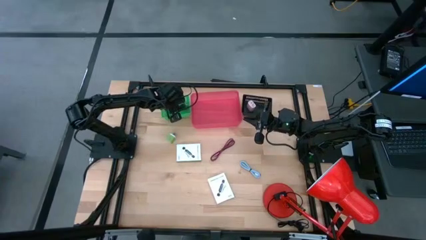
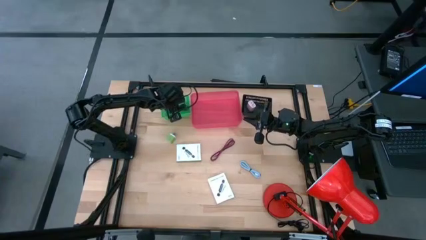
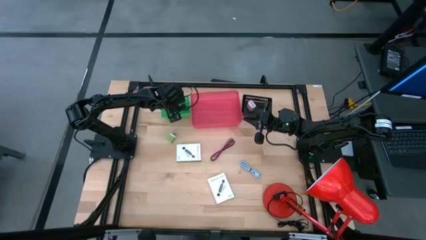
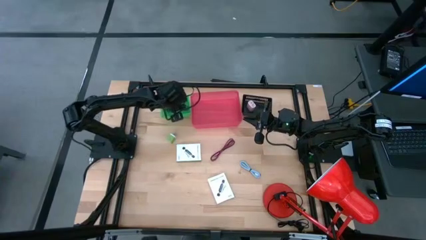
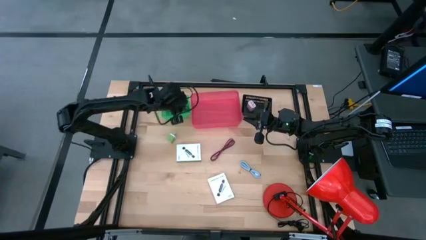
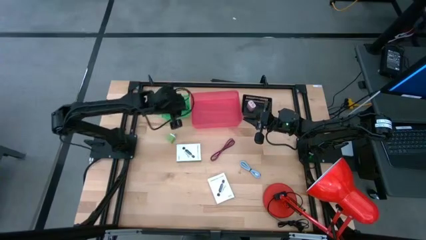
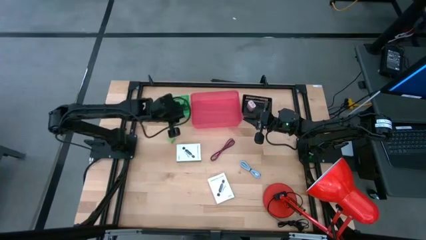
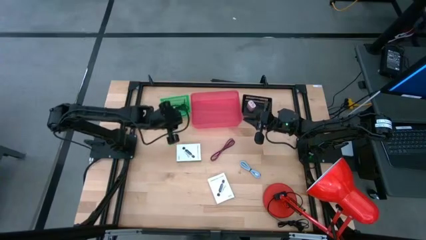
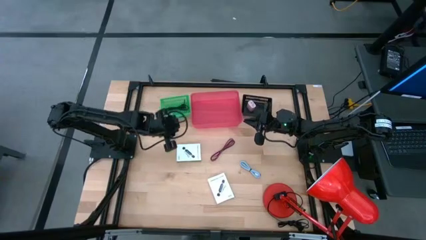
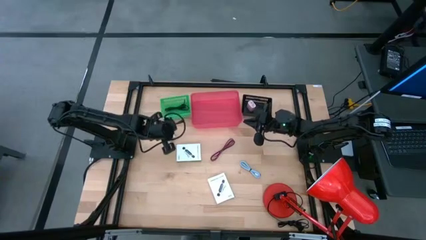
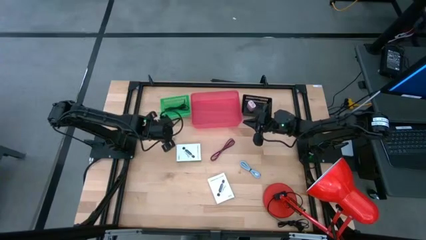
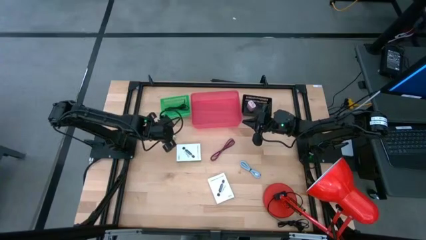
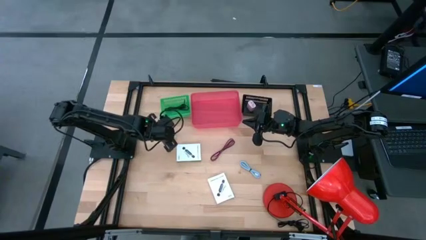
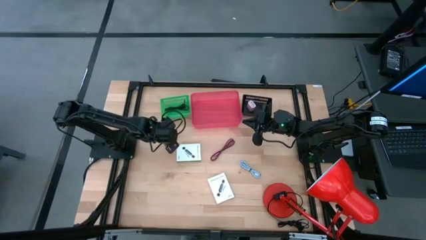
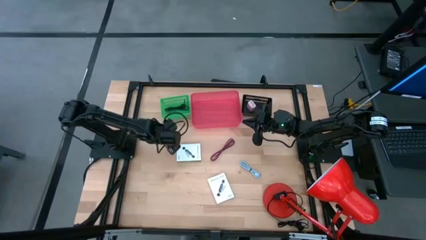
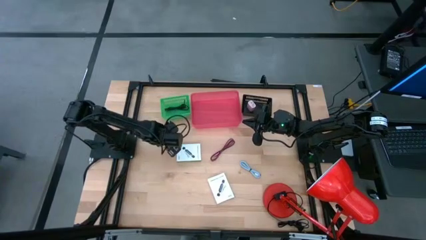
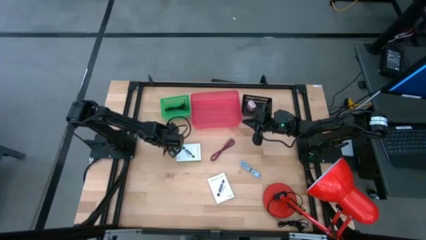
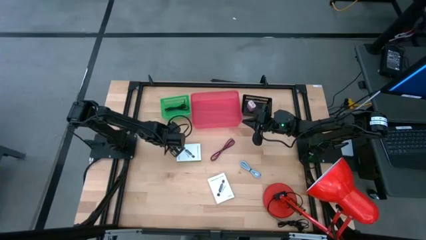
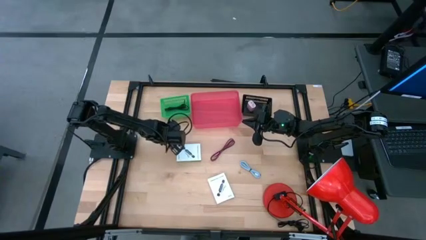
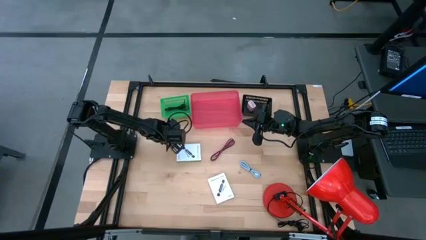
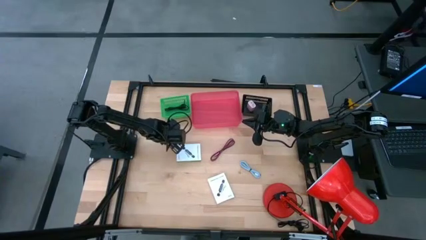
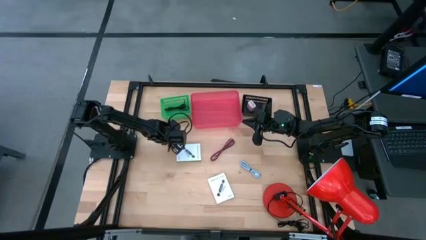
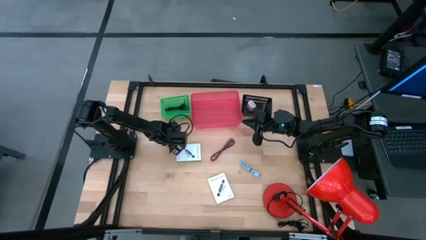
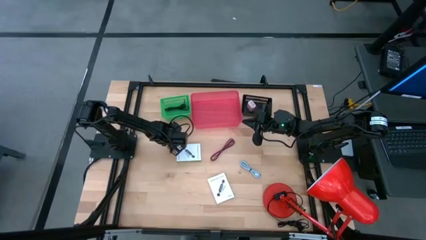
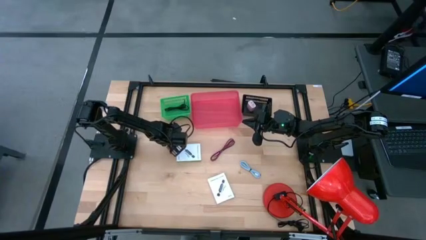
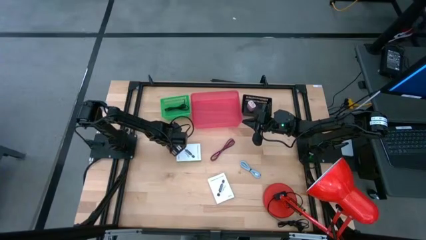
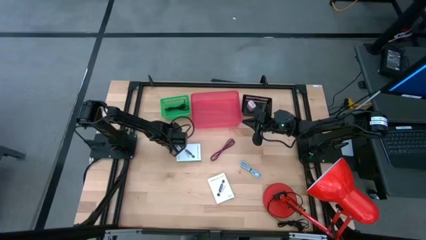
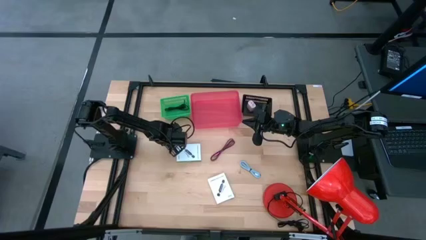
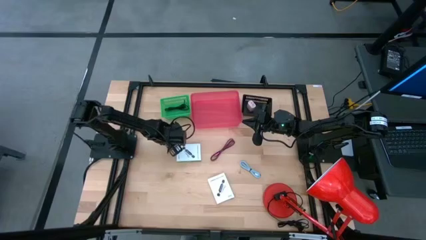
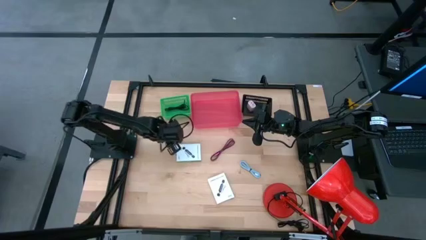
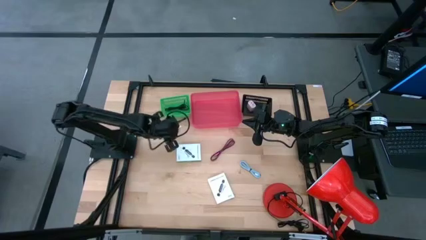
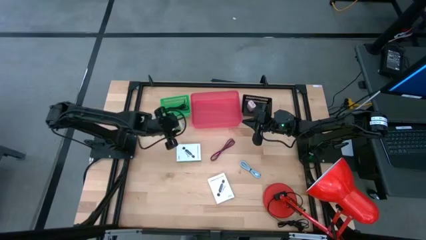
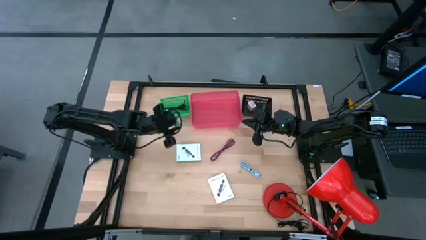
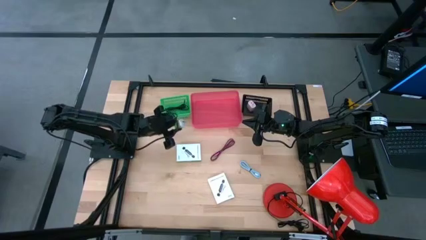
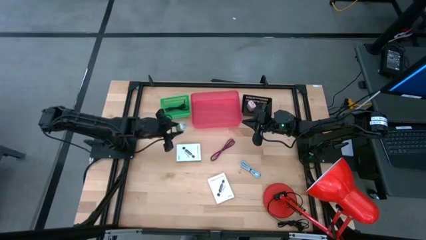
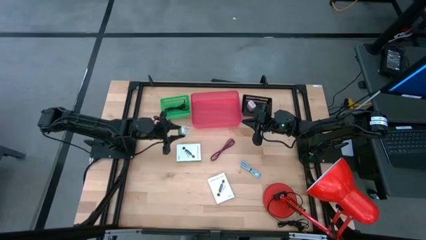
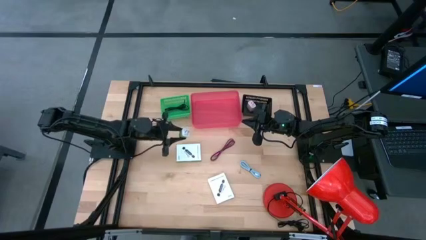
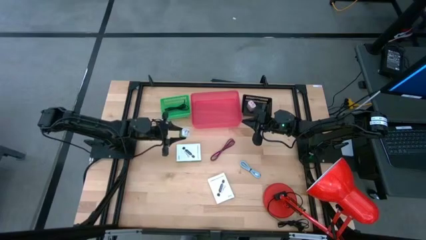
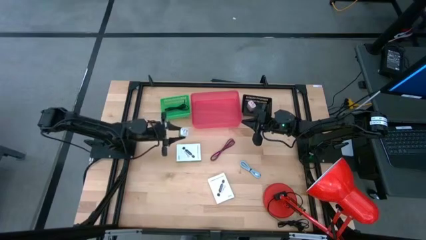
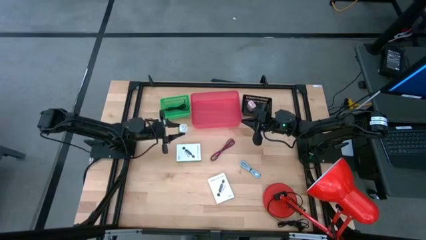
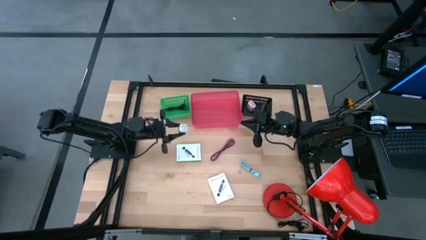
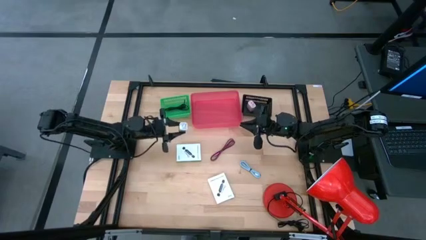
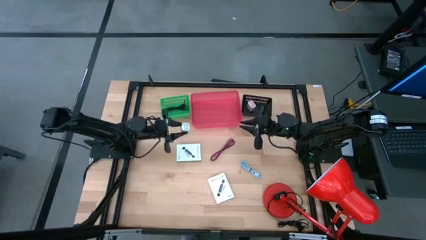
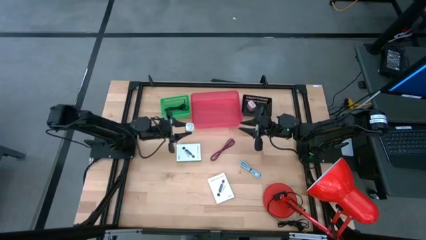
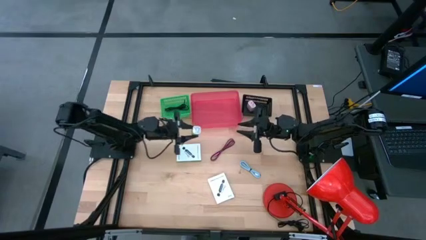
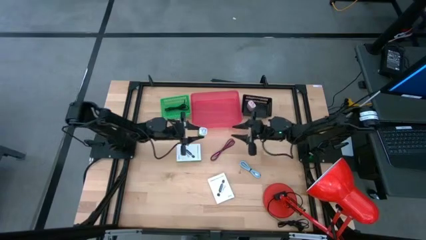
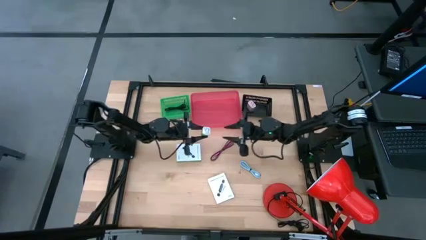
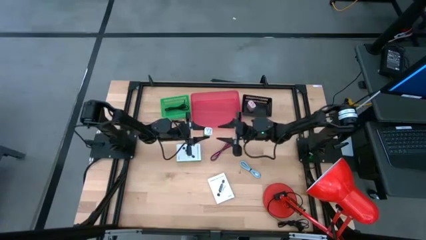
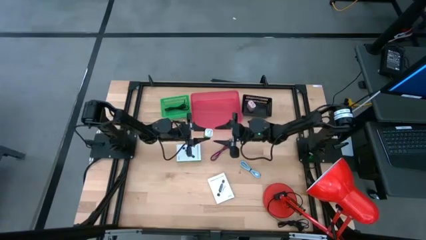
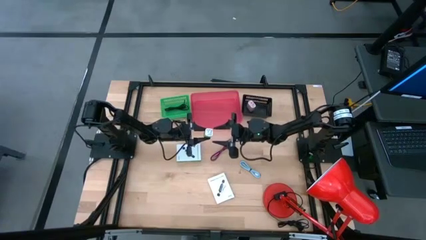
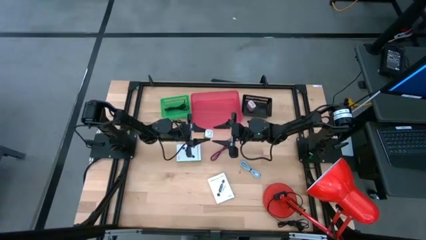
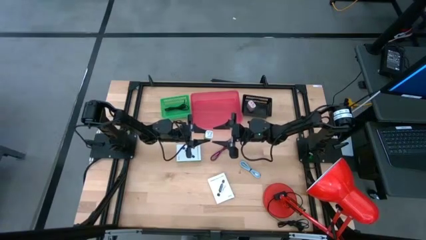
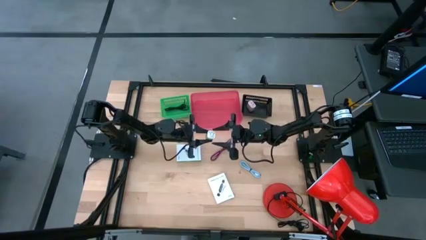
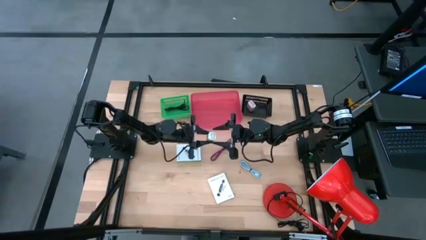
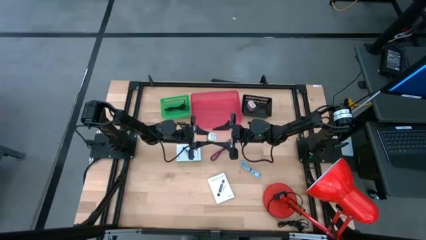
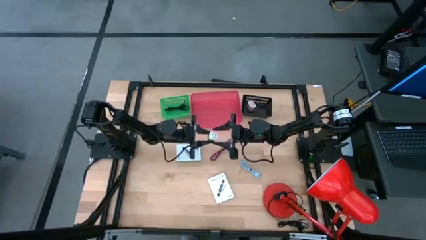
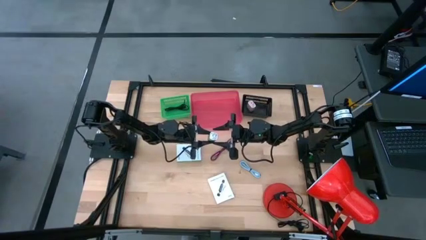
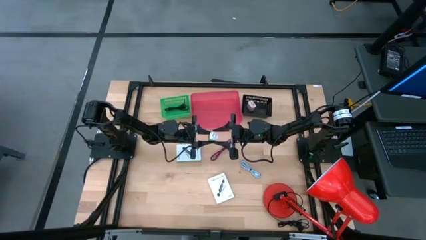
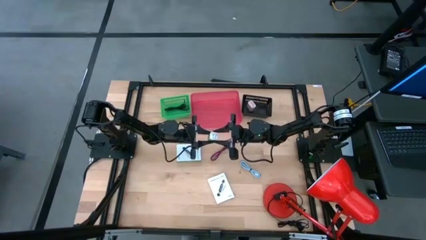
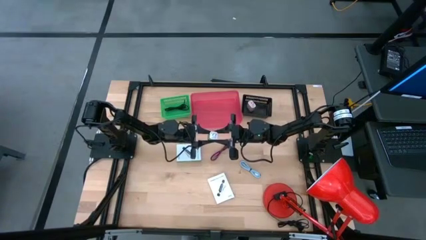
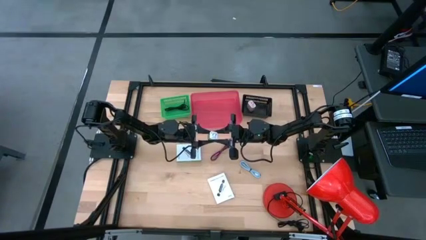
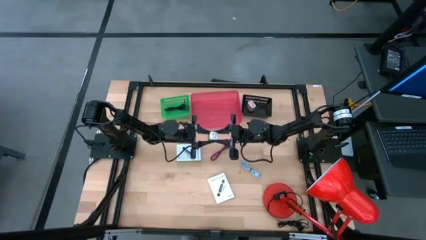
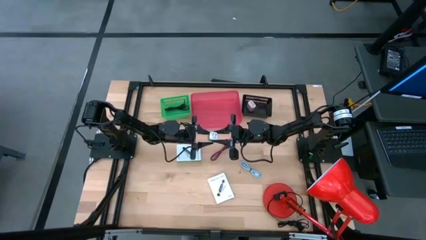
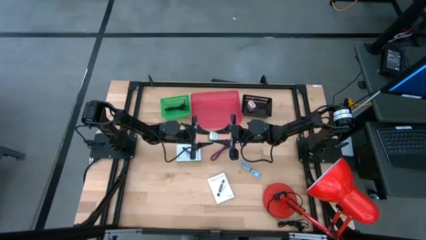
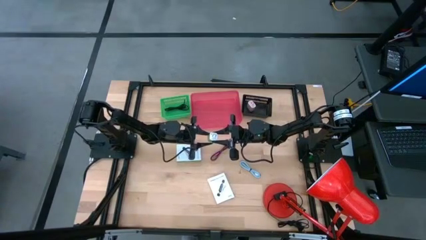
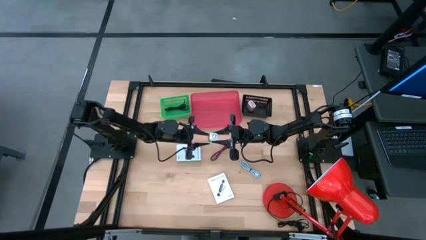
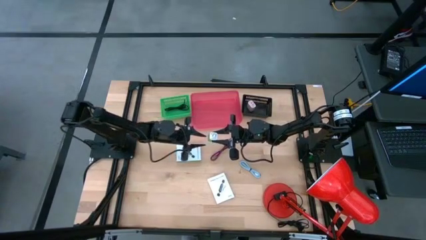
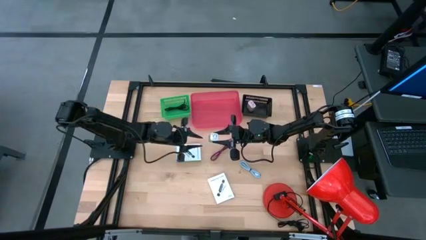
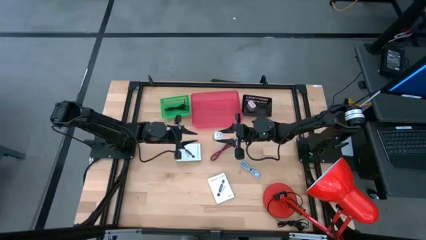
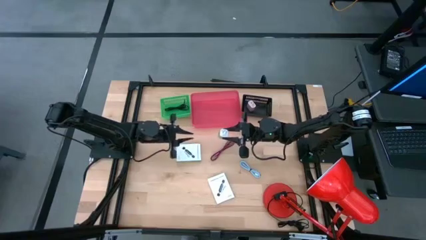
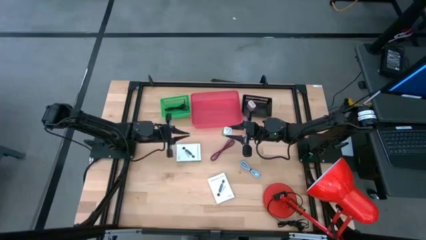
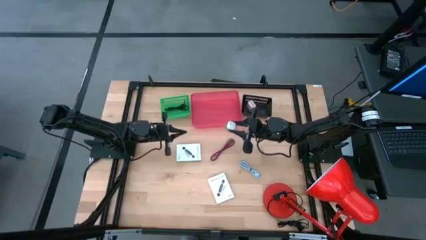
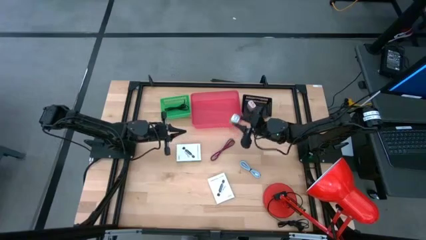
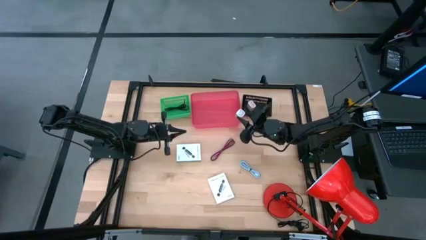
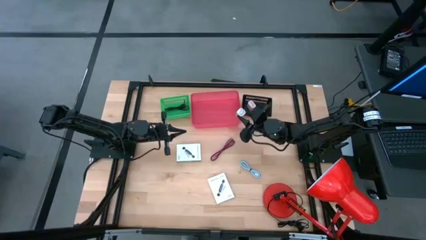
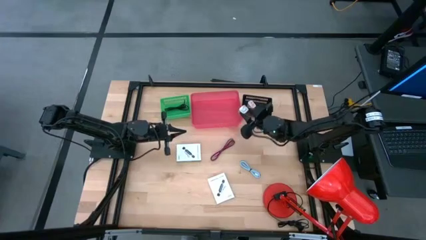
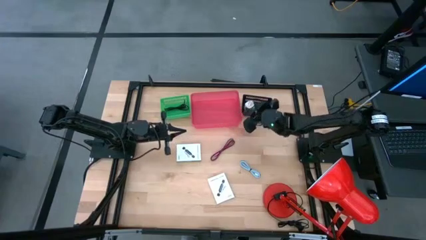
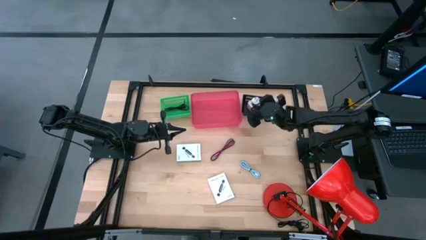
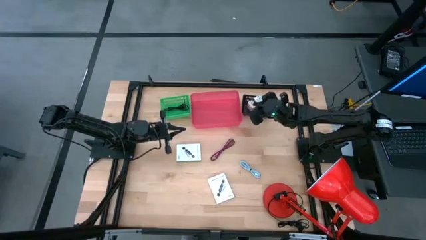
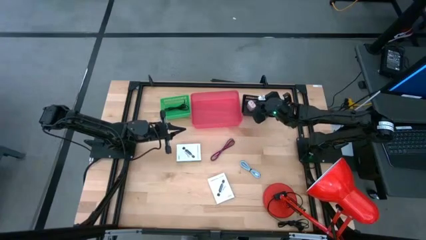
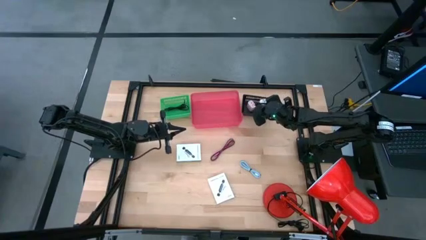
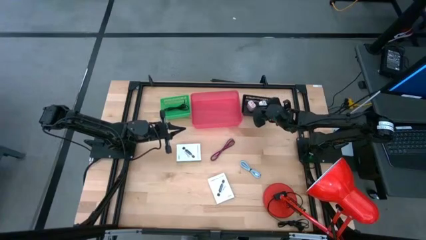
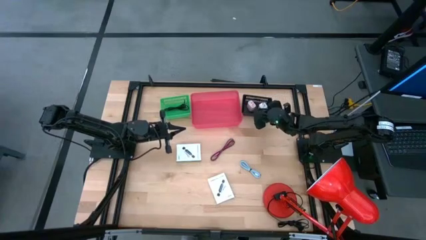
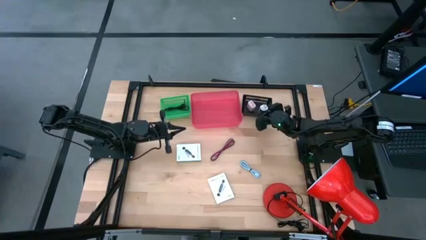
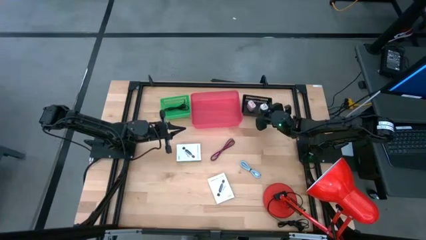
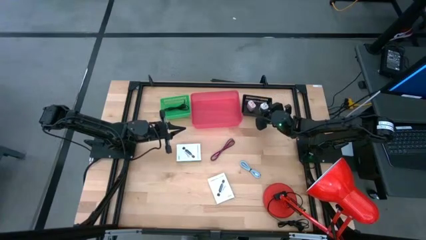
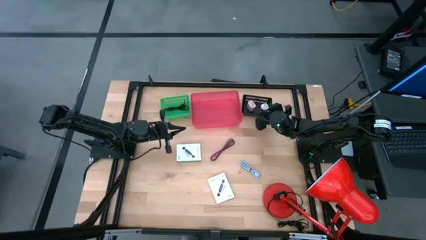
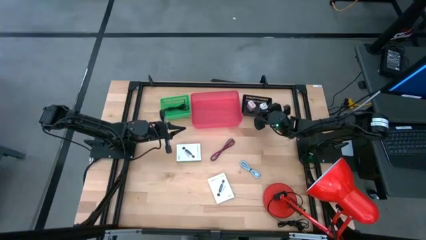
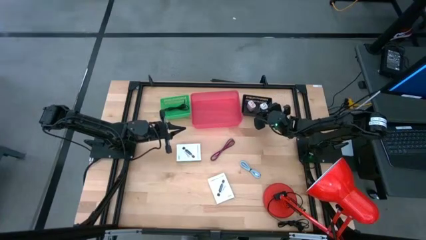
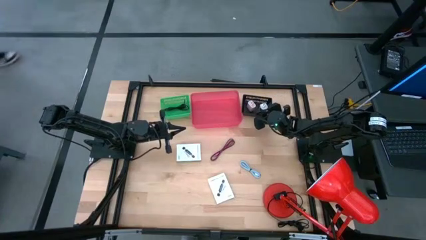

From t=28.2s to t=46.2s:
Task: Pick and place items into bin
Put the green charger adapter into the black bin
